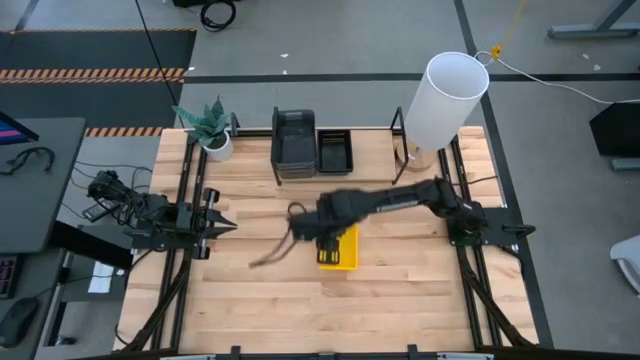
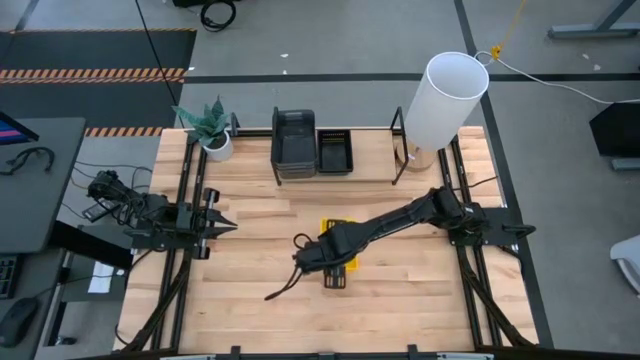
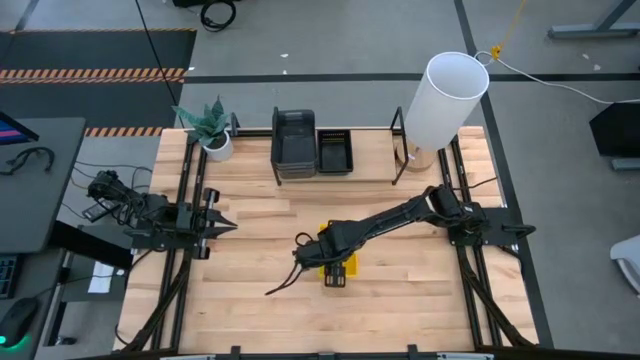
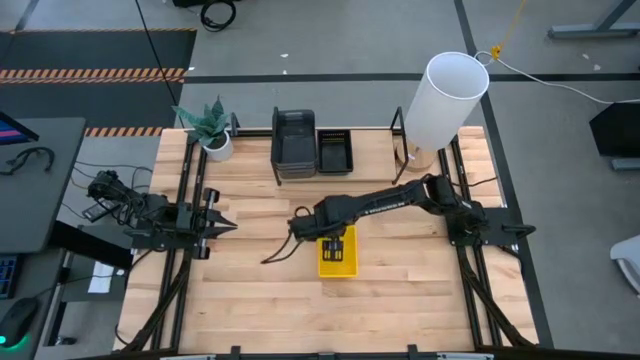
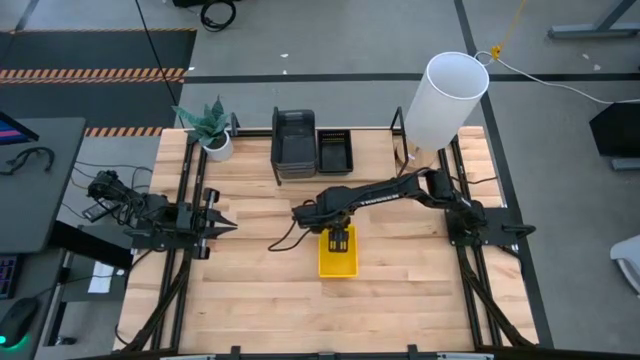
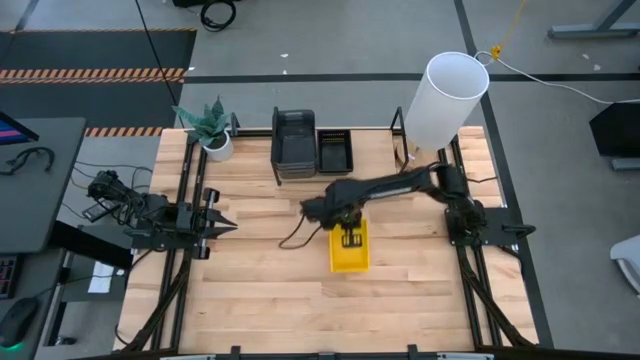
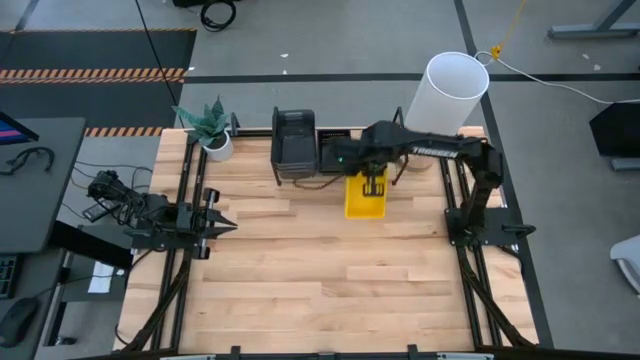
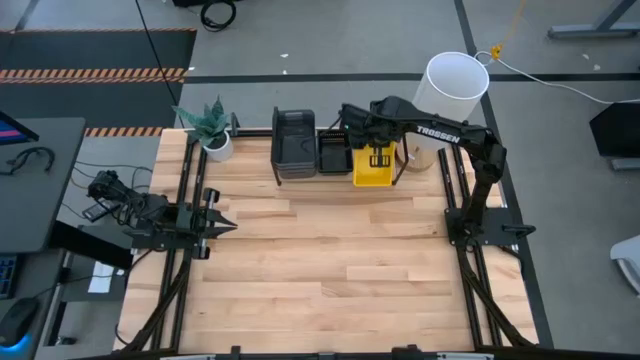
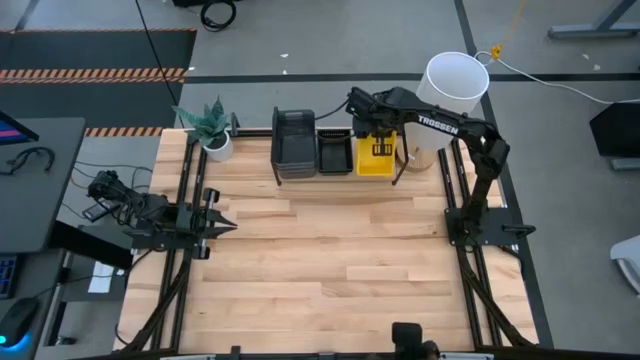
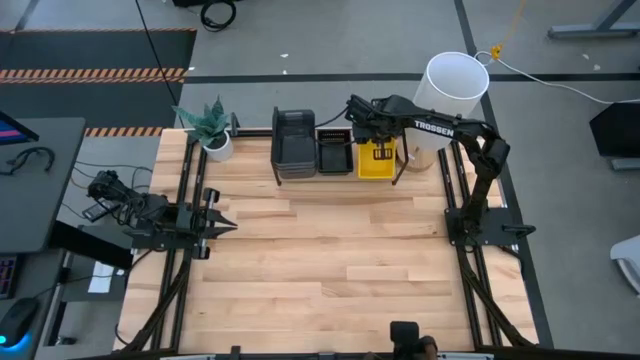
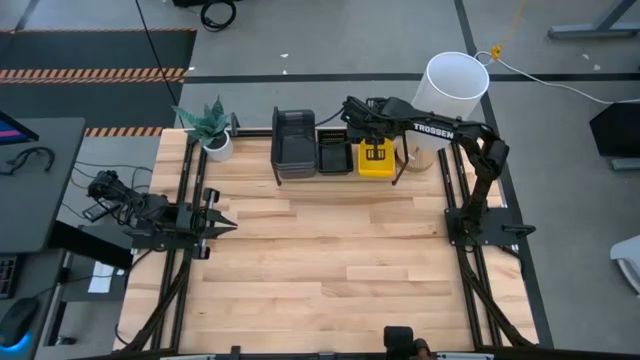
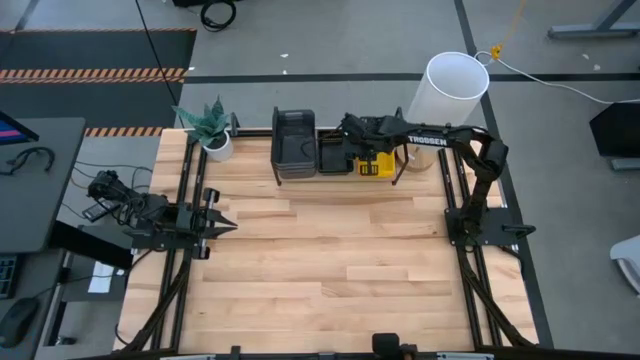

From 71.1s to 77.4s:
Task: Stack baskets on shelf by color
Put the stacked yellow baskets on the shelf

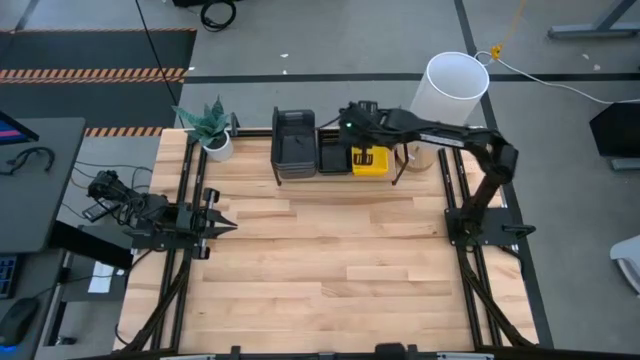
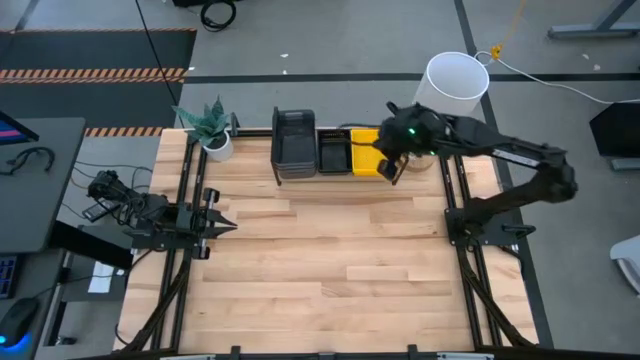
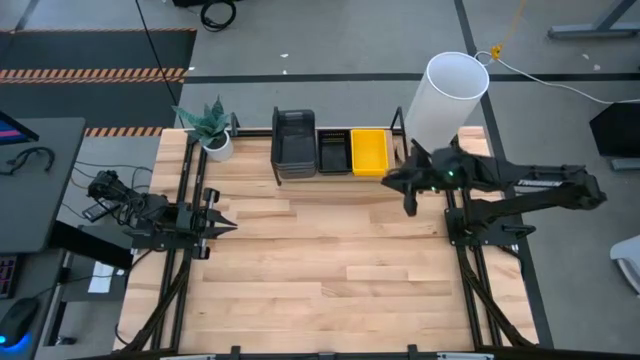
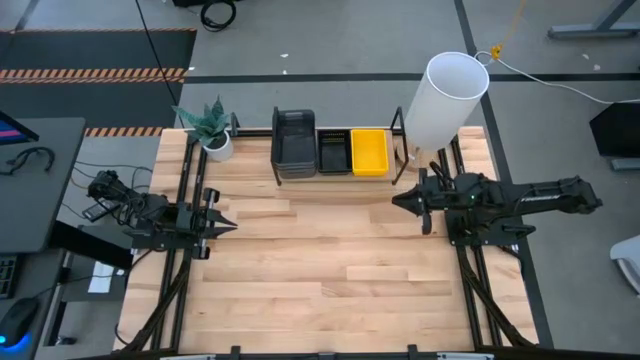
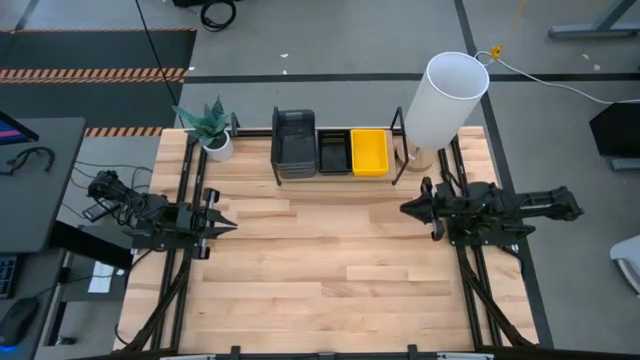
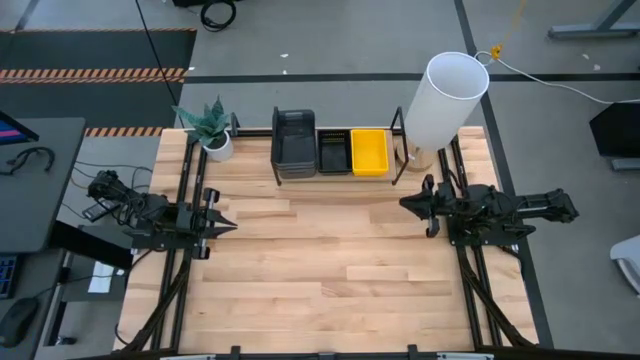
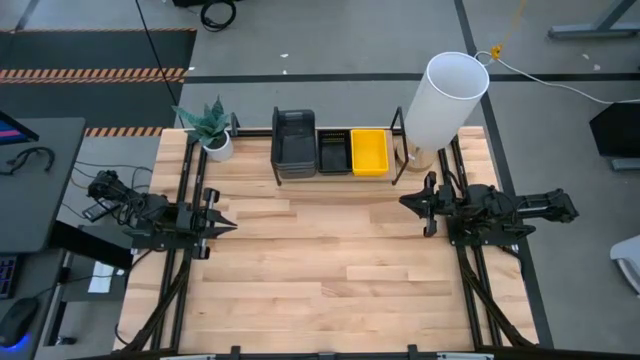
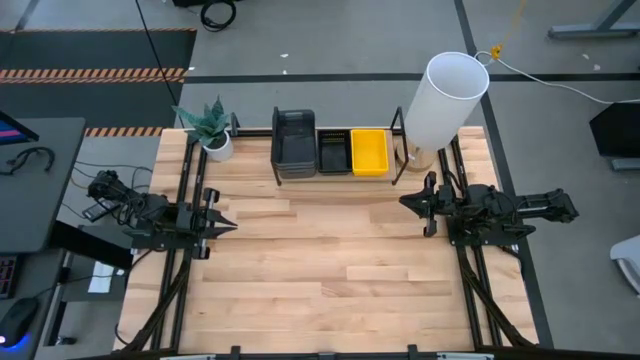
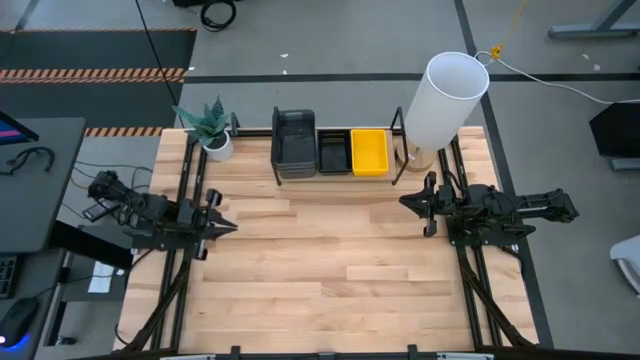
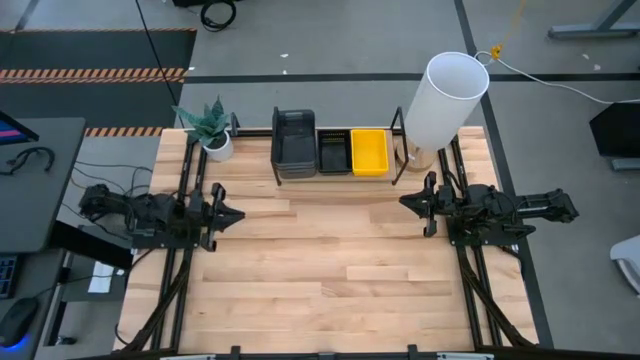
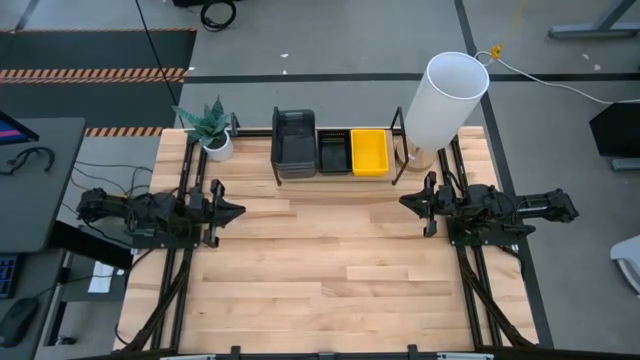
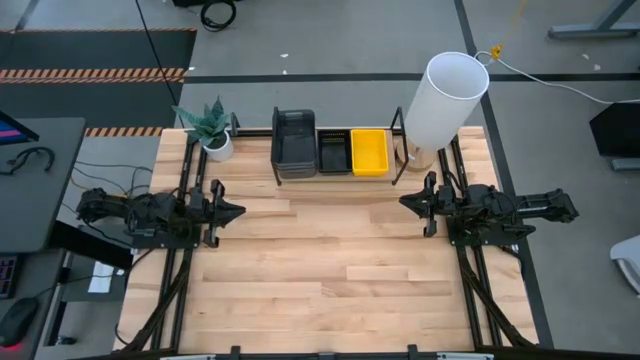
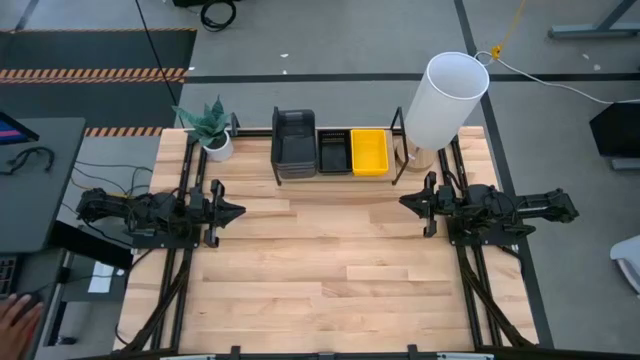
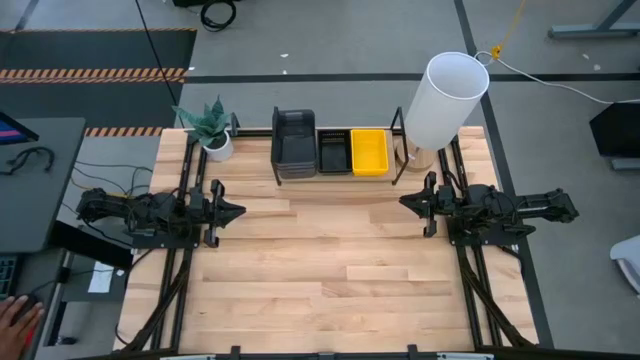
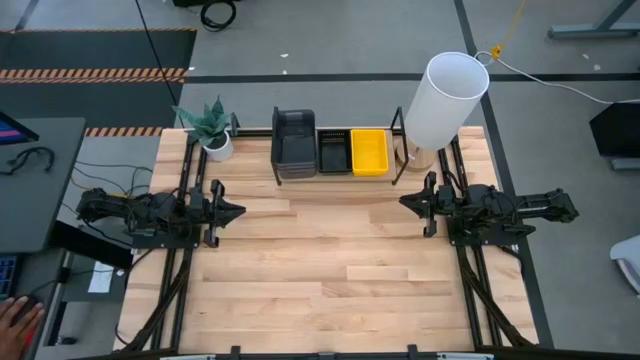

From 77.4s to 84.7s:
Return to Home Position

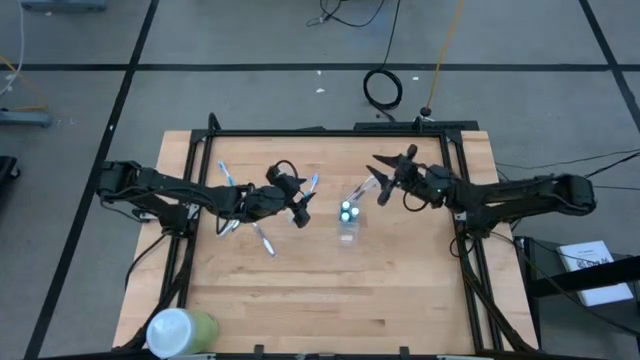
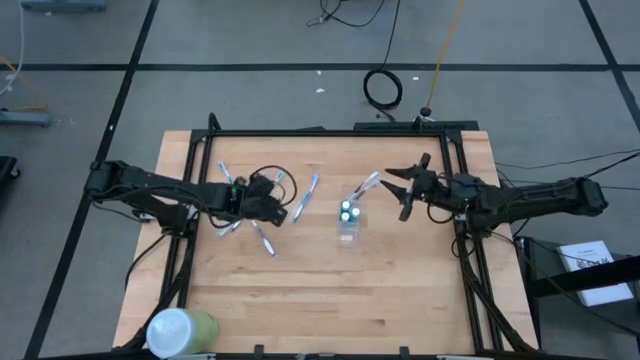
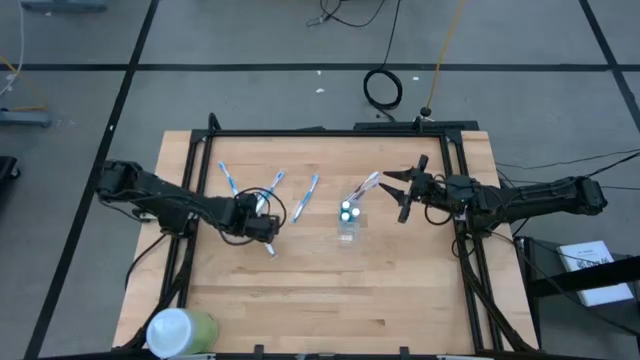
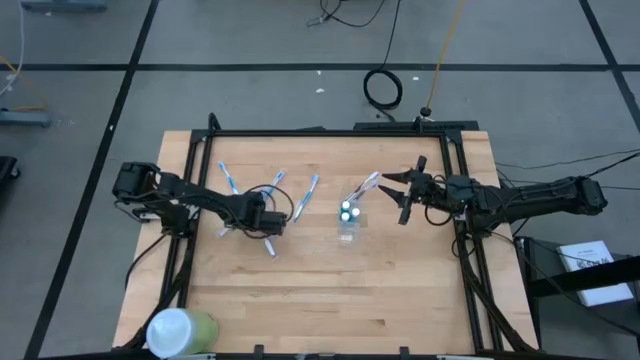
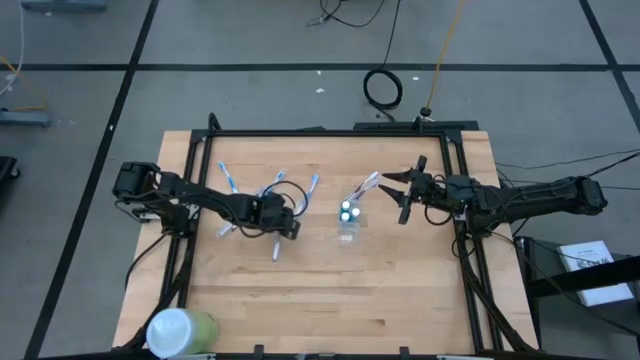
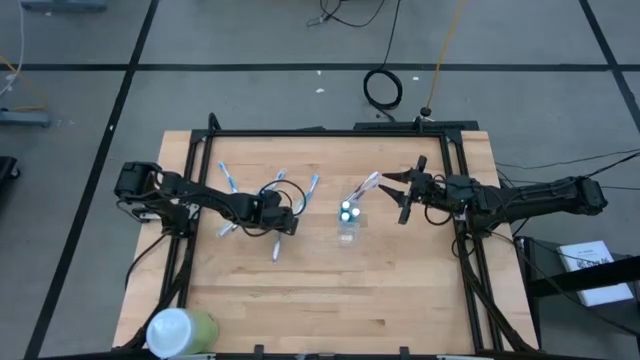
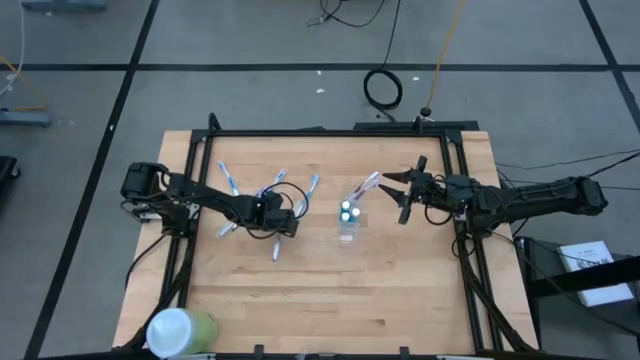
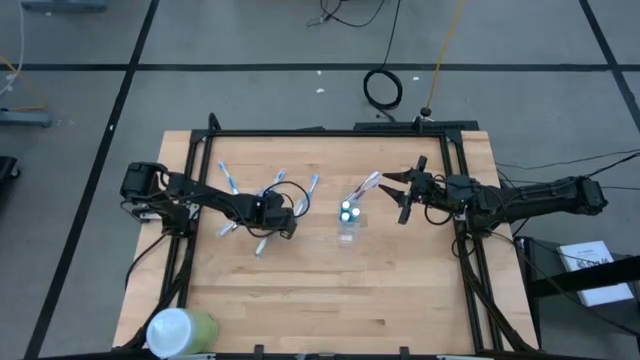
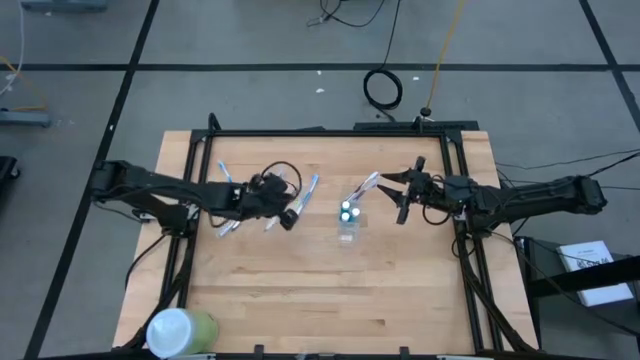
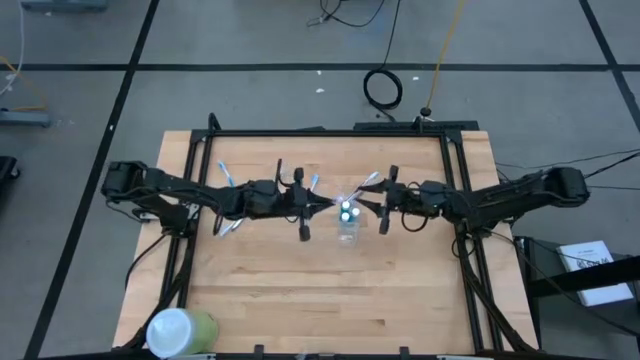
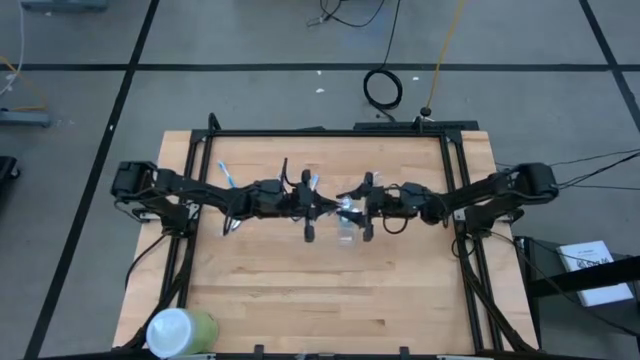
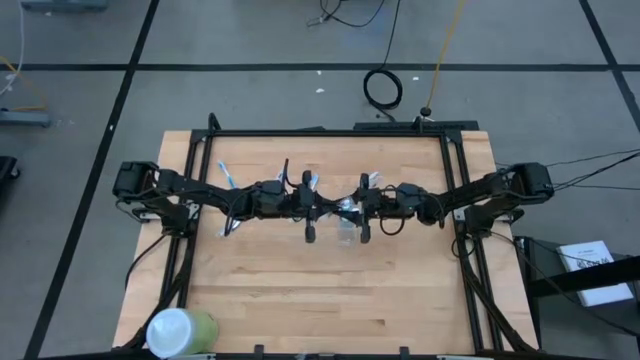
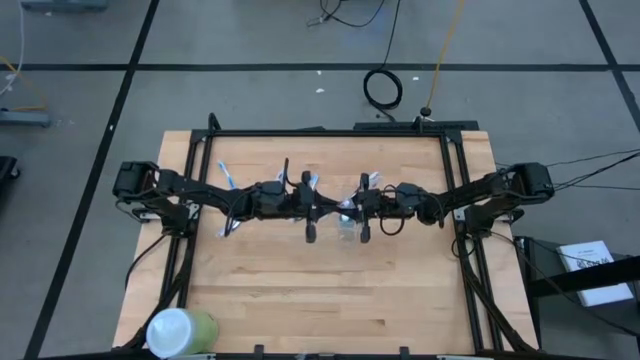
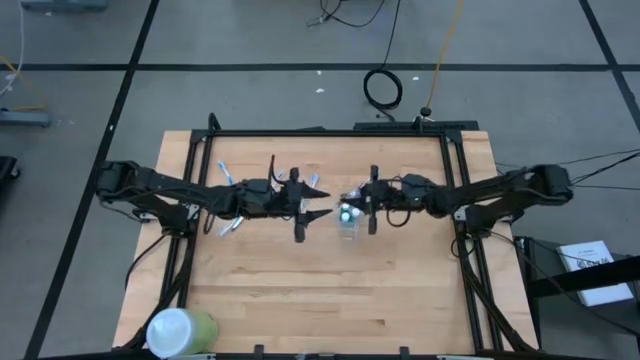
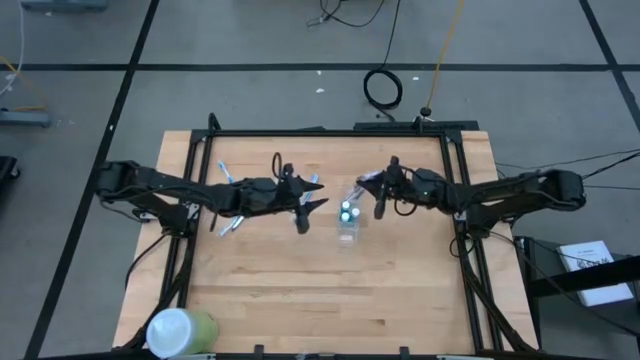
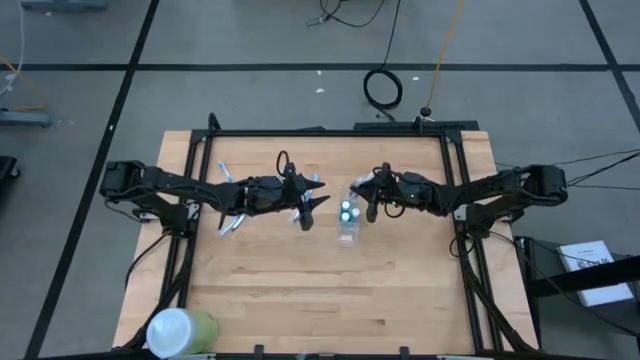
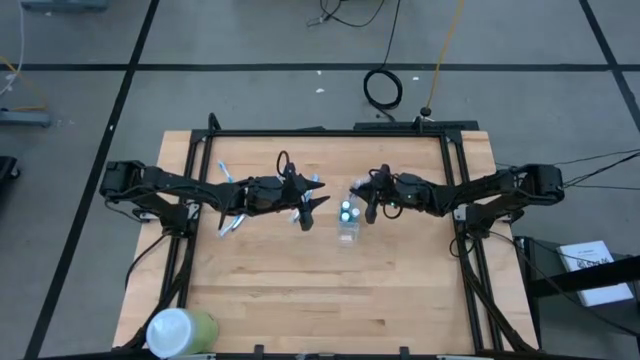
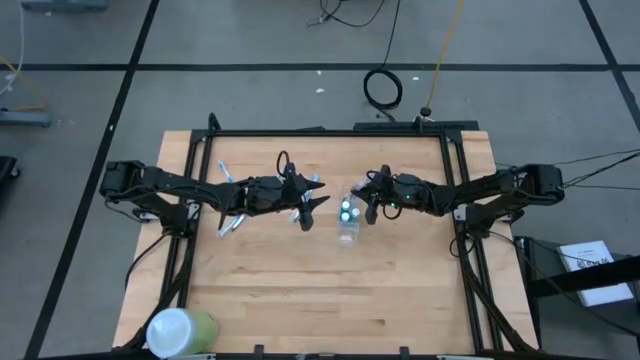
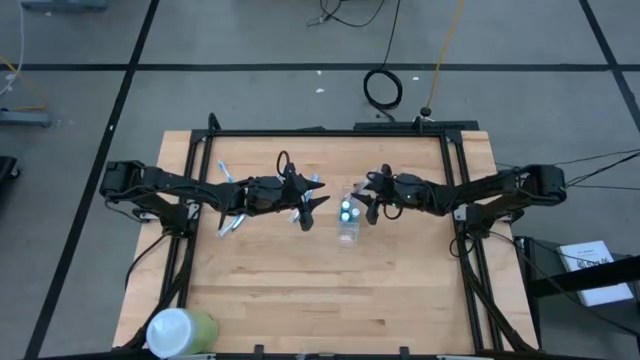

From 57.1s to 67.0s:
Task: Pick & Place toothbrushing station
Put the violet toothbrush into the transparent organizer
